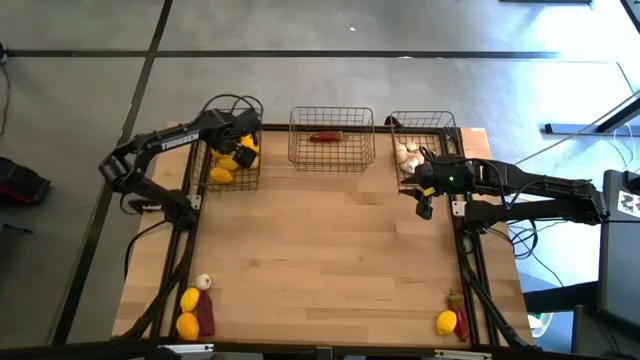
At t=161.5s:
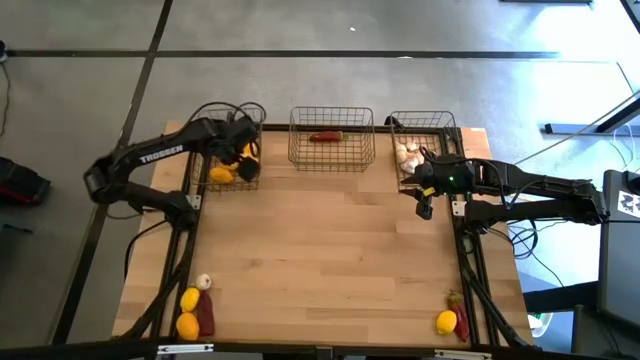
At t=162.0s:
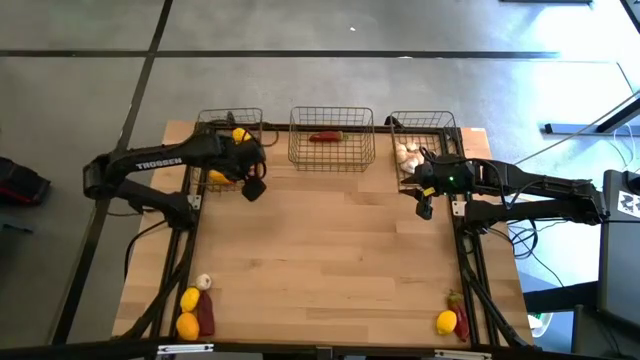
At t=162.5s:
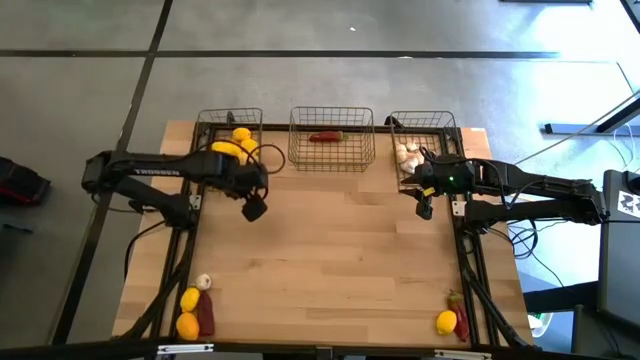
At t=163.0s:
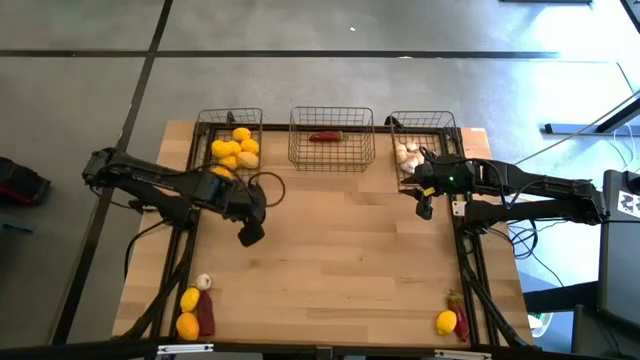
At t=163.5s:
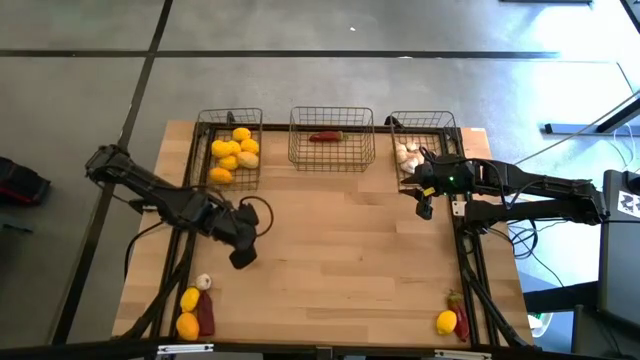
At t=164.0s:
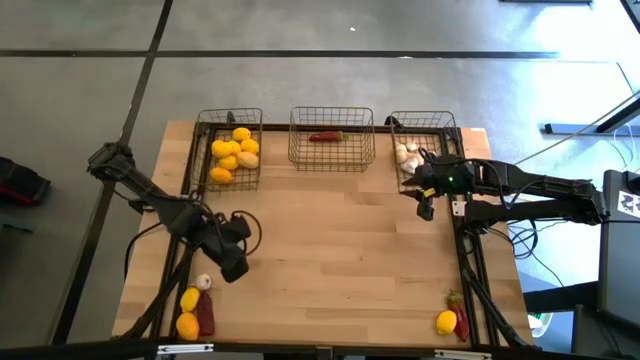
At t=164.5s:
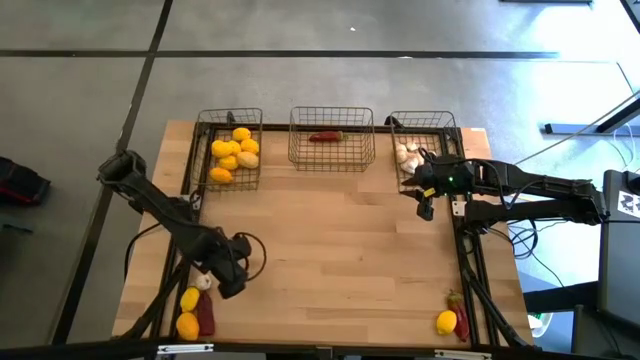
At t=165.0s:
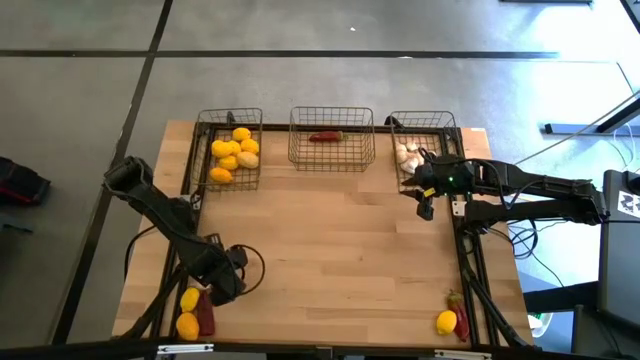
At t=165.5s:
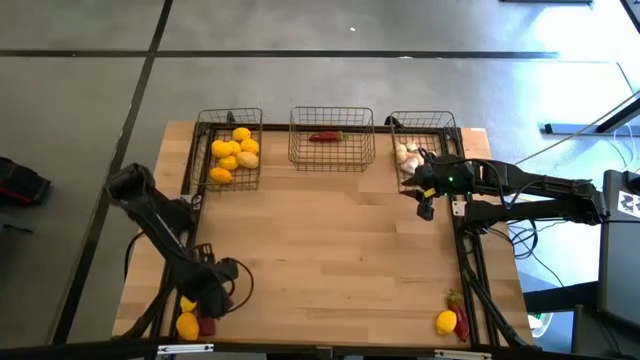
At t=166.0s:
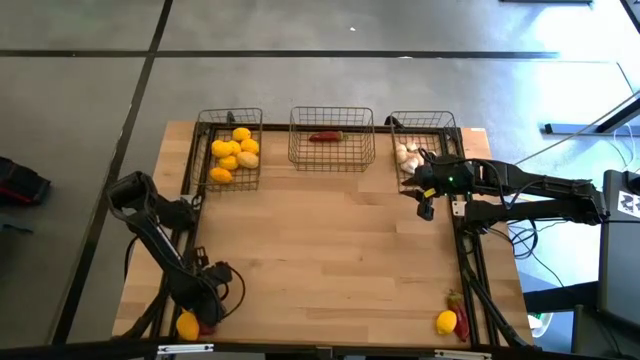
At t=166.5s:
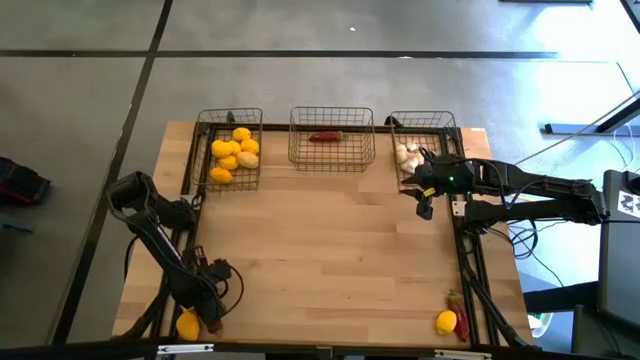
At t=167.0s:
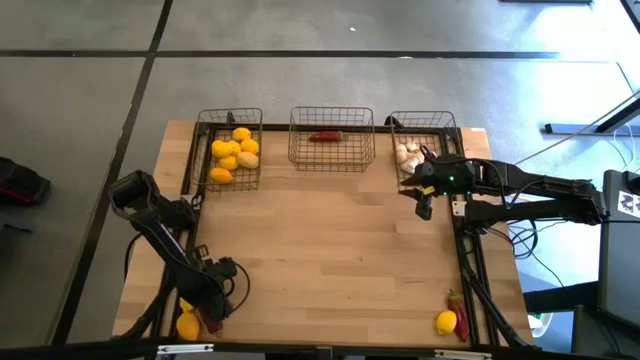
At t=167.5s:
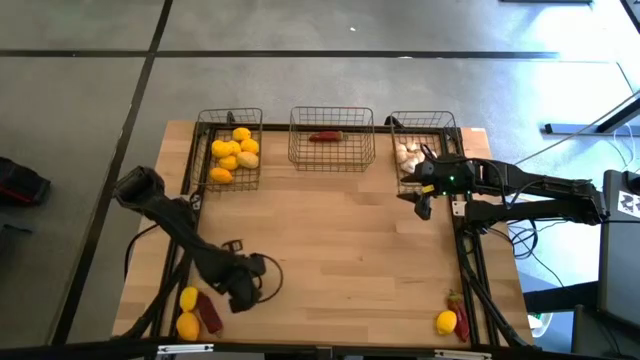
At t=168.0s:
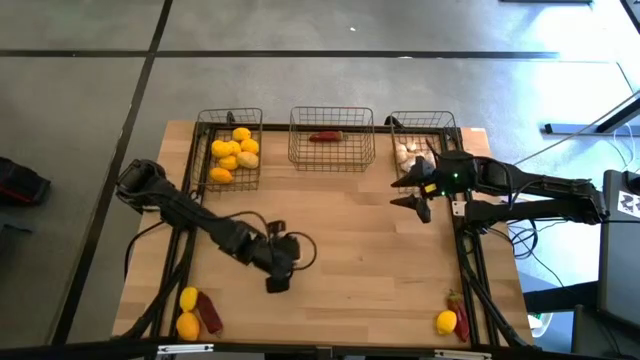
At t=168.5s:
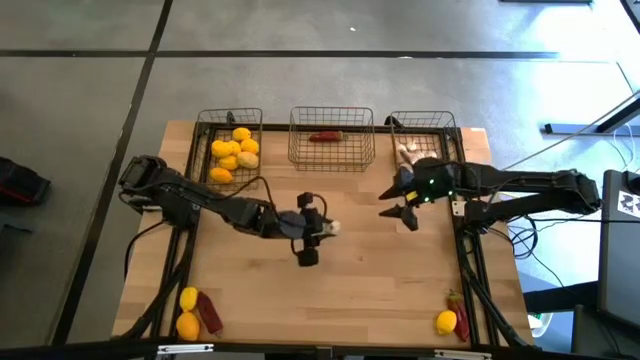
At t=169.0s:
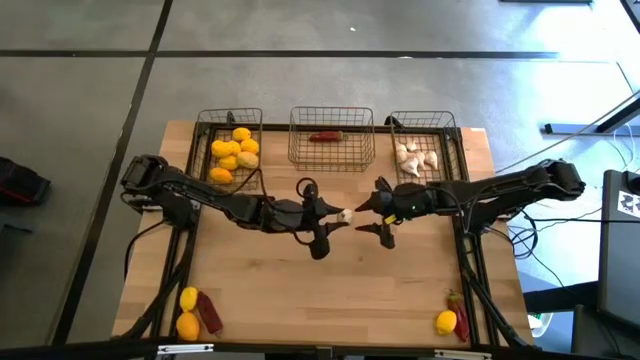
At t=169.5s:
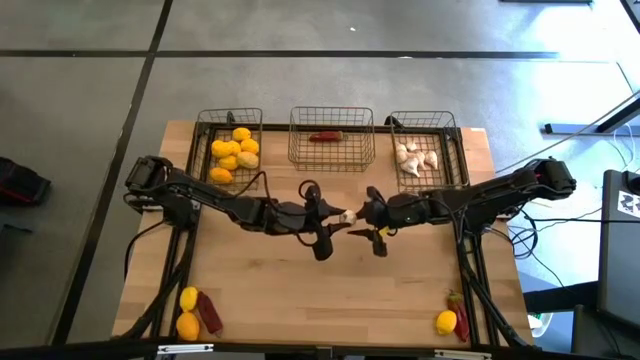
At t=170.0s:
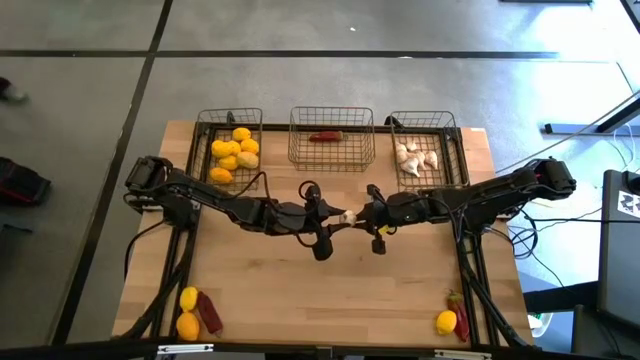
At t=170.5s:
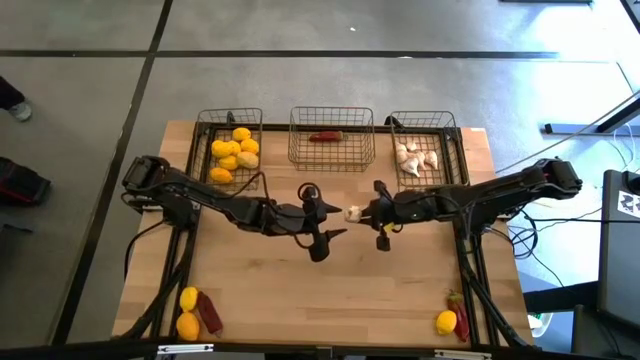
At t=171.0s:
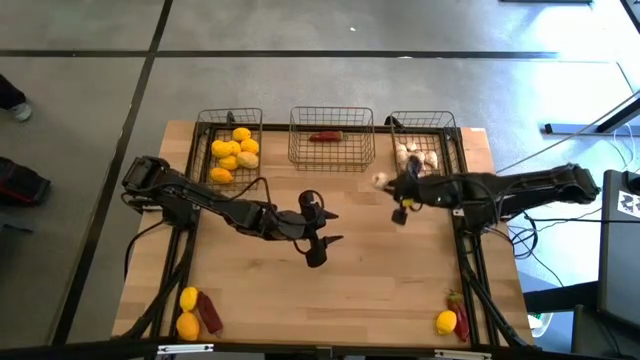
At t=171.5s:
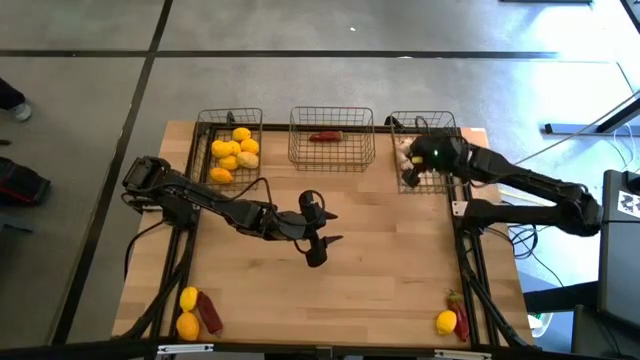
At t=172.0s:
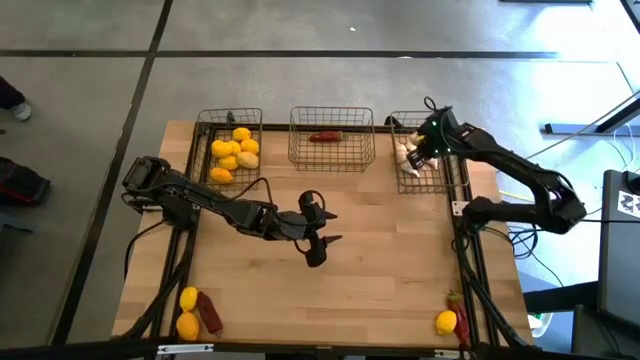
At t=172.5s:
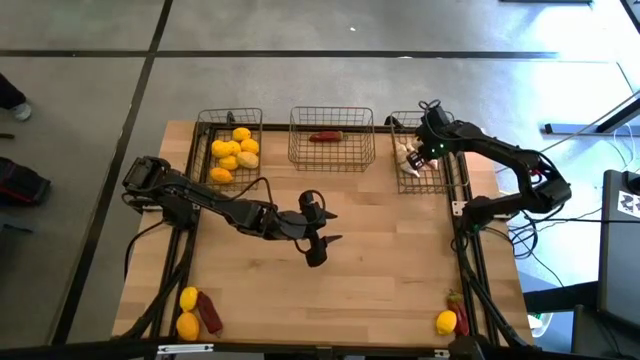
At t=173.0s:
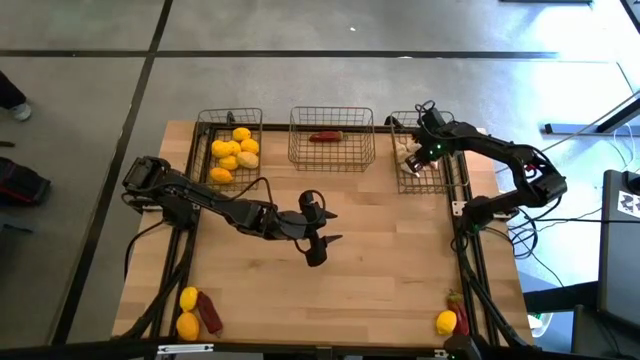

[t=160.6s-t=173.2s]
Task: Sort produce into baskets
Put the white garlic into the right gold wire basket

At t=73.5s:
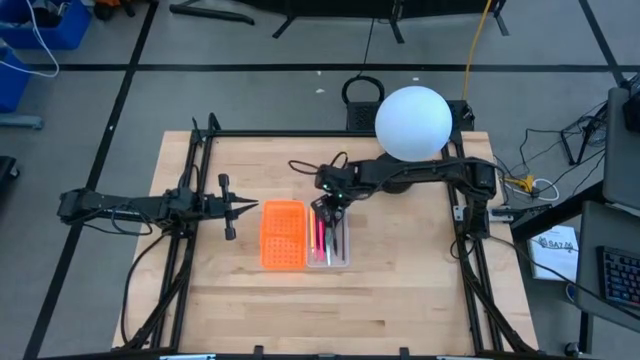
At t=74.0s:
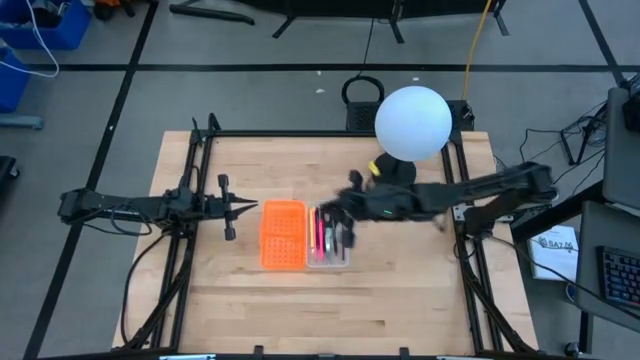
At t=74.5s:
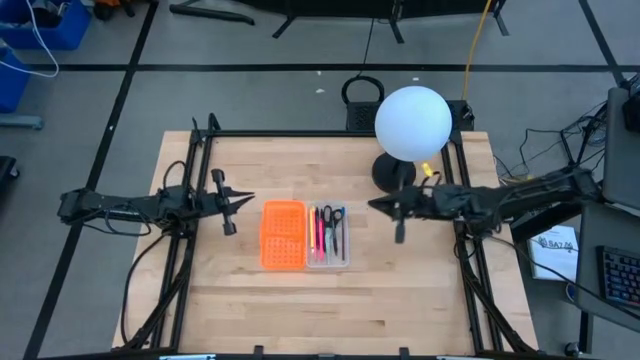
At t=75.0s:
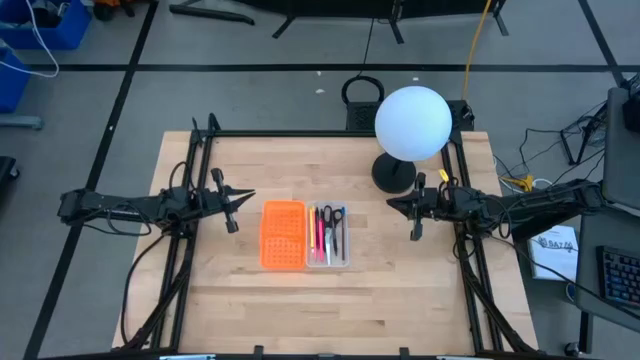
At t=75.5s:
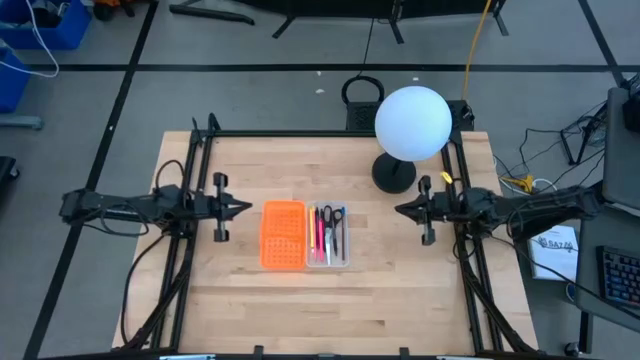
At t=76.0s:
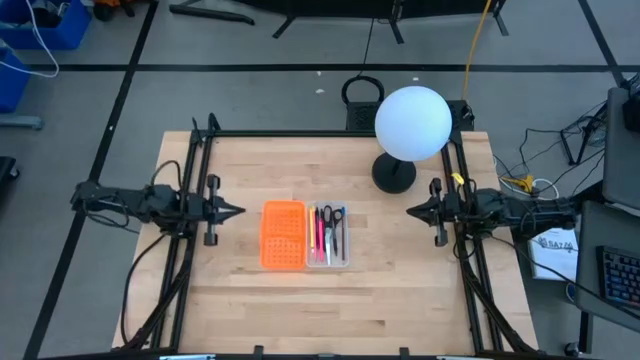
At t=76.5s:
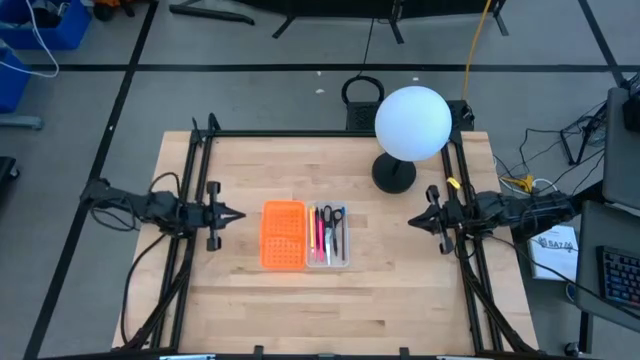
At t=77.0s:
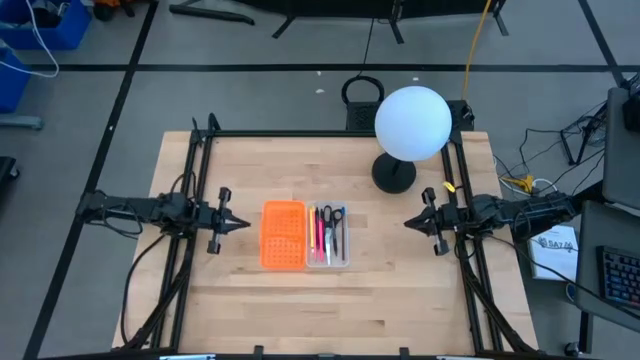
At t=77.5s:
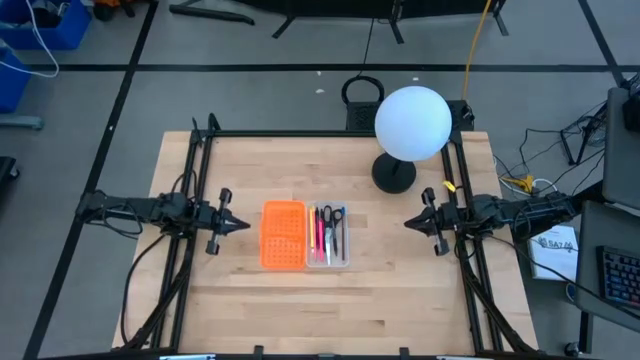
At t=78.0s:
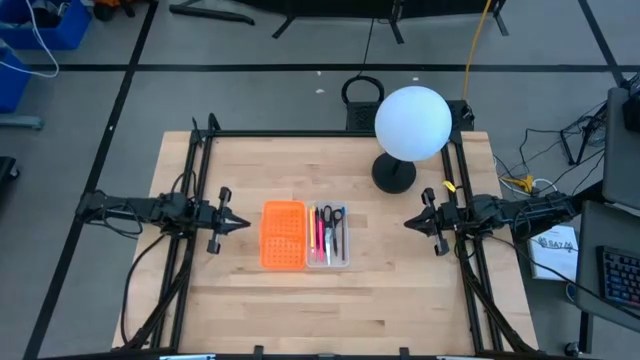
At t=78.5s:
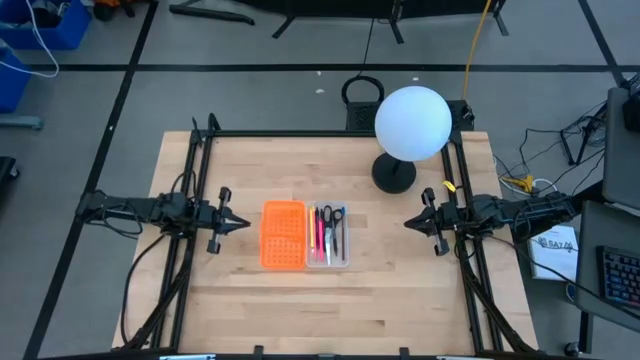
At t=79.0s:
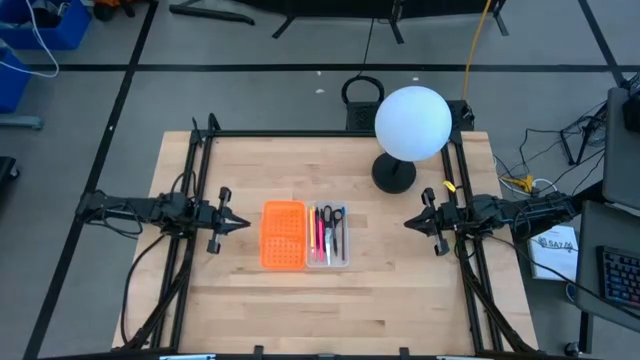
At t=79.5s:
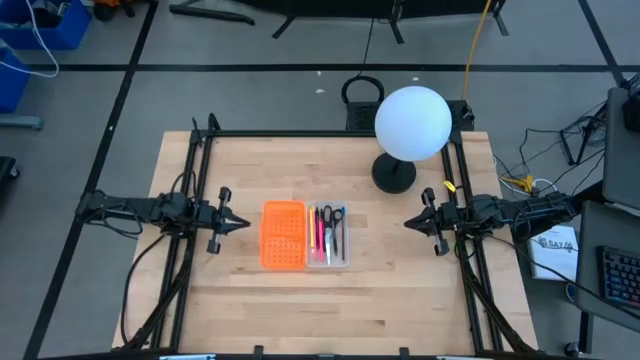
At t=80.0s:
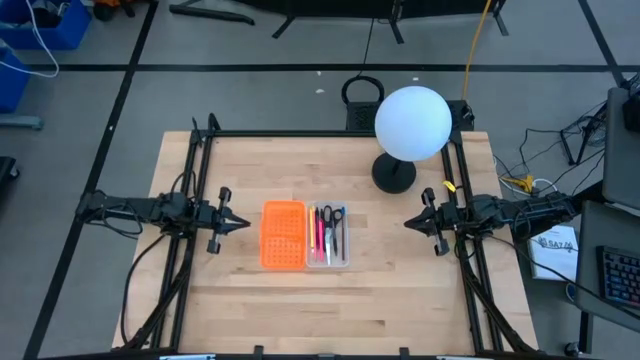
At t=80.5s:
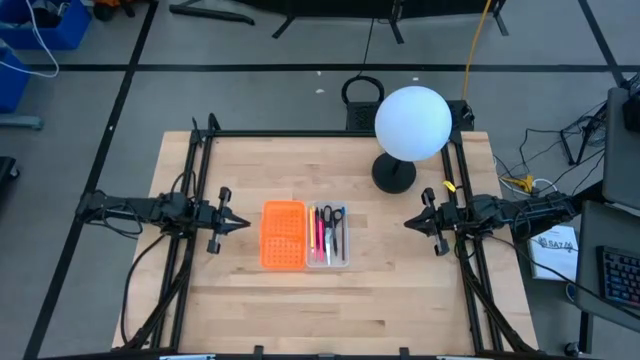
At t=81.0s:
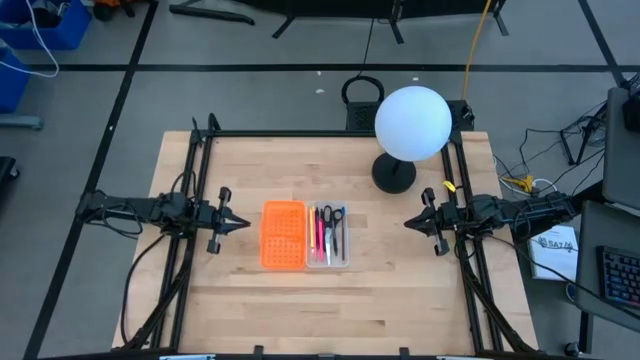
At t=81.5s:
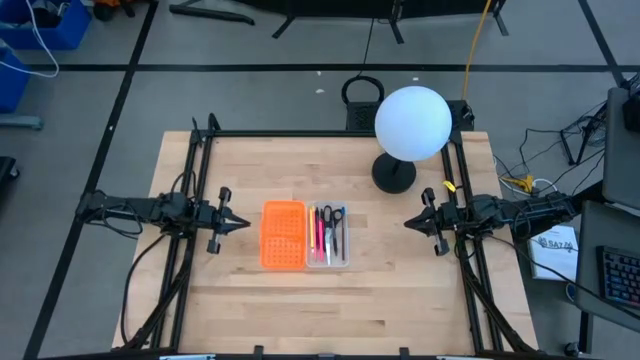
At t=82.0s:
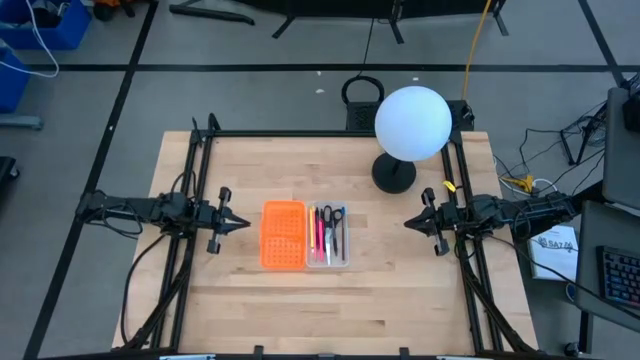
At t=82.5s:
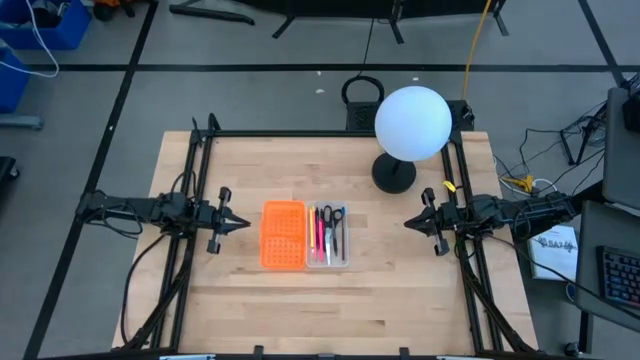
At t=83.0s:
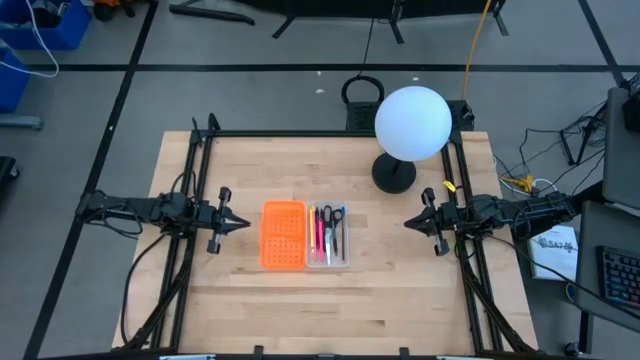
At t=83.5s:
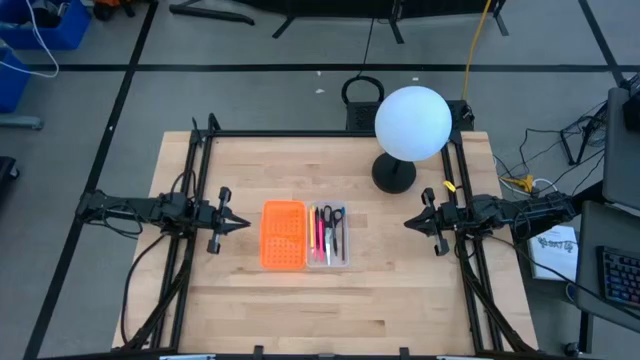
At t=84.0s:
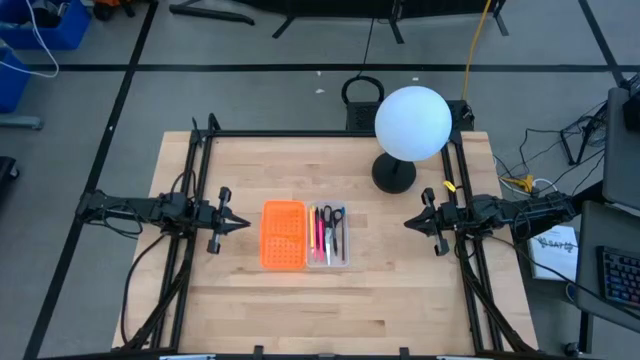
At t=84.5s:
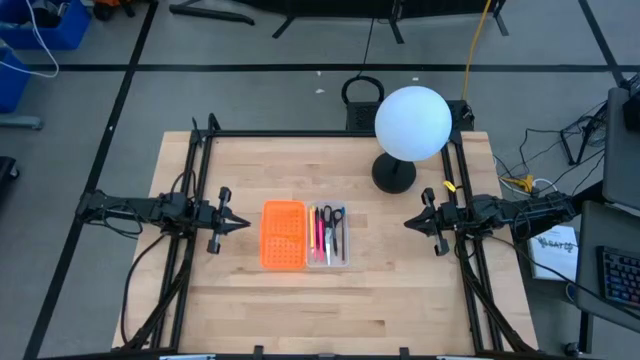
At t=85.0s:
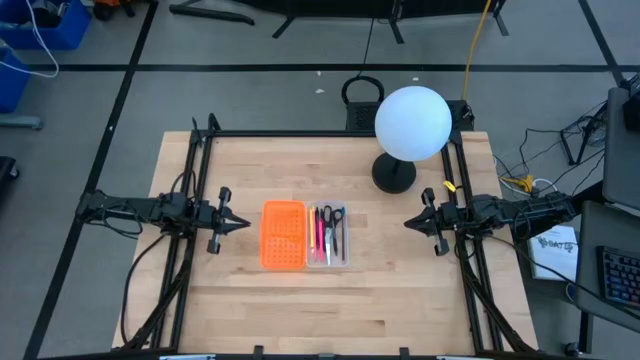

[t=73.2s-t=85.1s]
Task: Pick & place school supplies into a supply box
Return to Home Position
